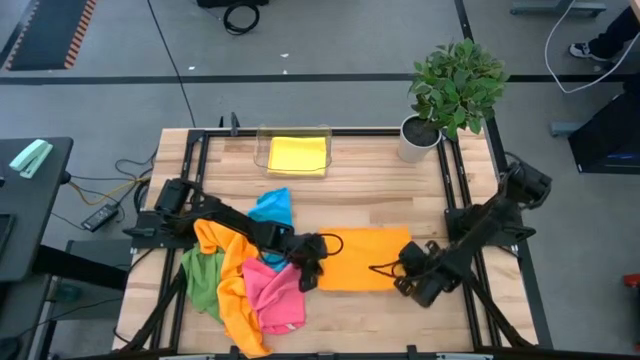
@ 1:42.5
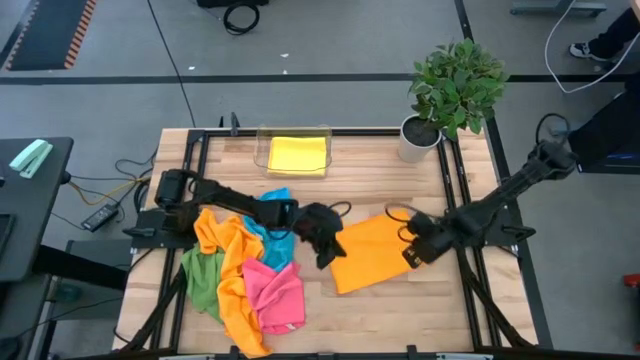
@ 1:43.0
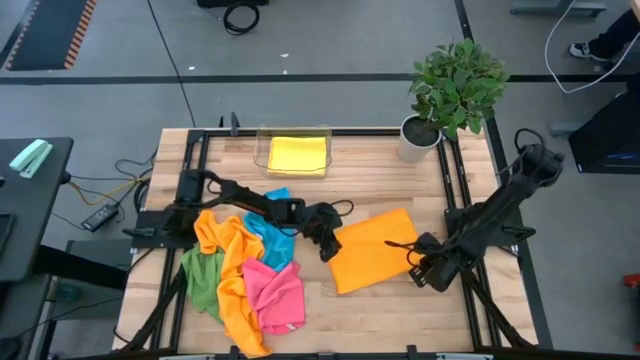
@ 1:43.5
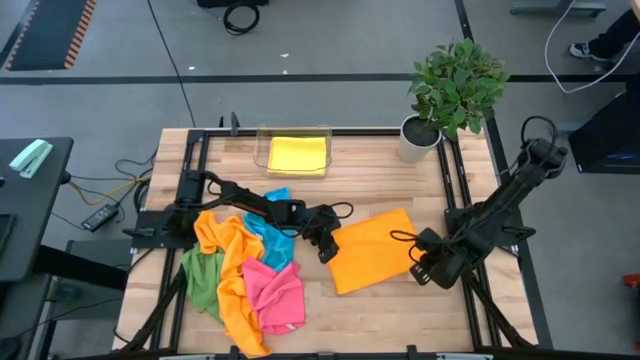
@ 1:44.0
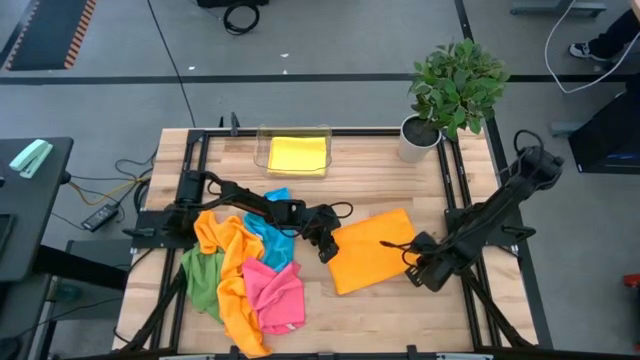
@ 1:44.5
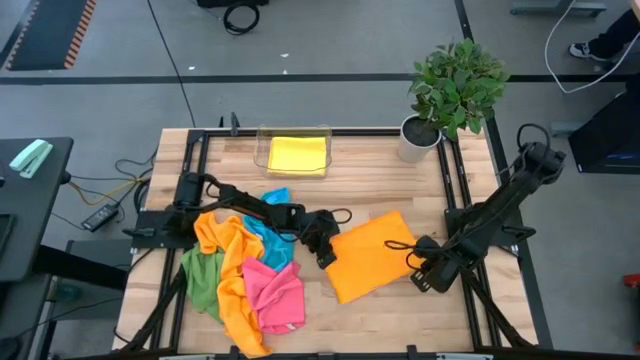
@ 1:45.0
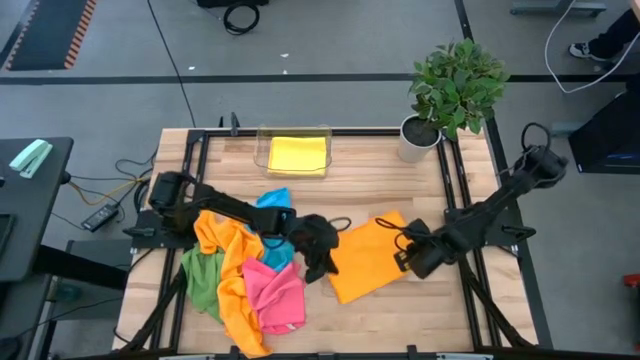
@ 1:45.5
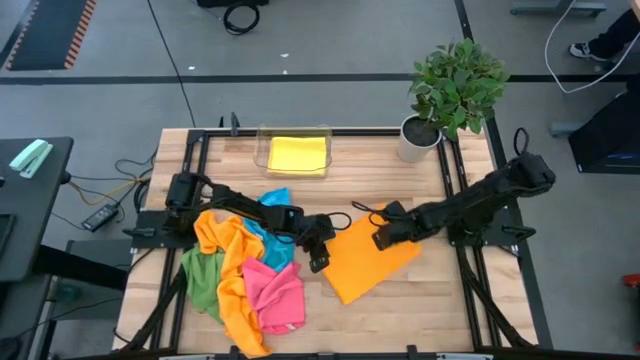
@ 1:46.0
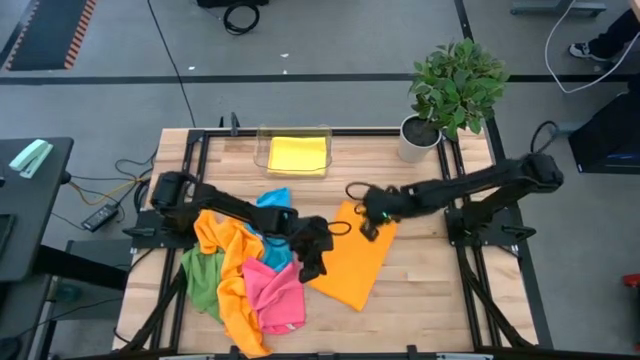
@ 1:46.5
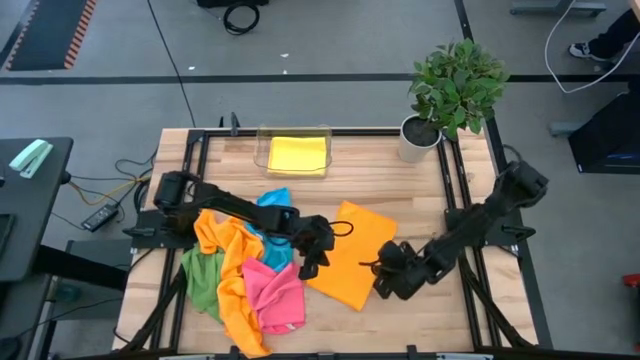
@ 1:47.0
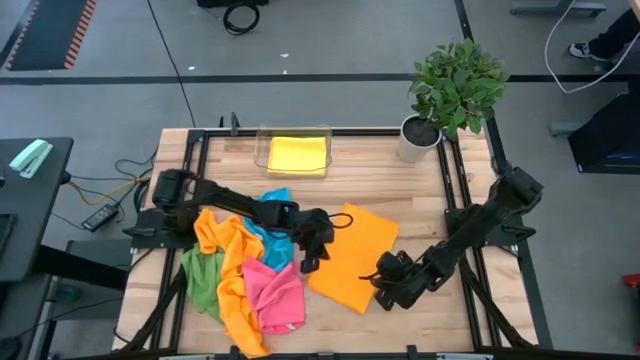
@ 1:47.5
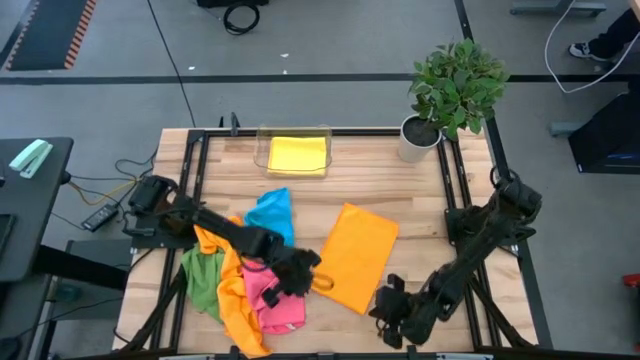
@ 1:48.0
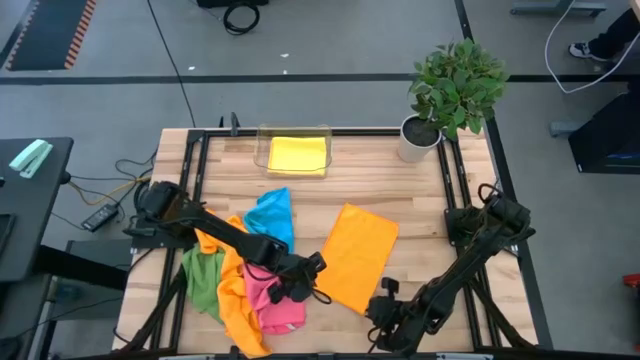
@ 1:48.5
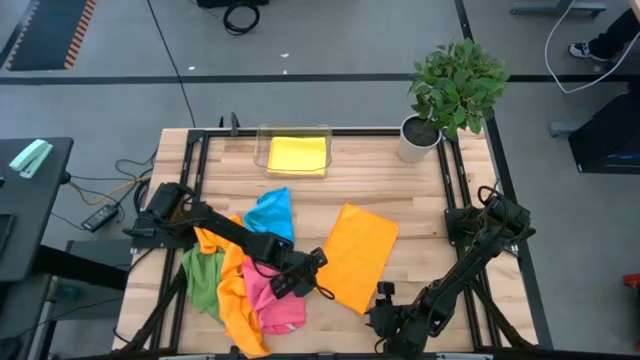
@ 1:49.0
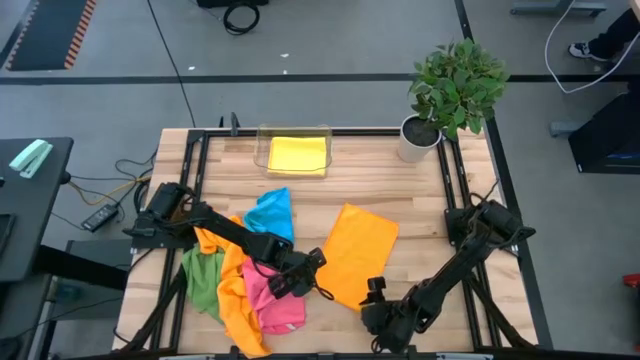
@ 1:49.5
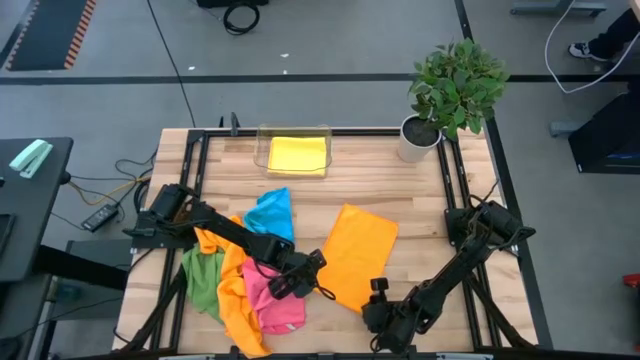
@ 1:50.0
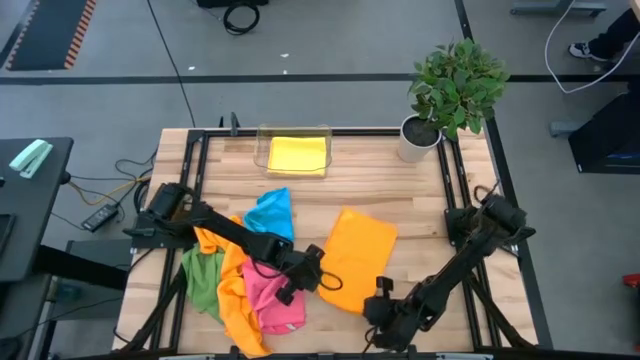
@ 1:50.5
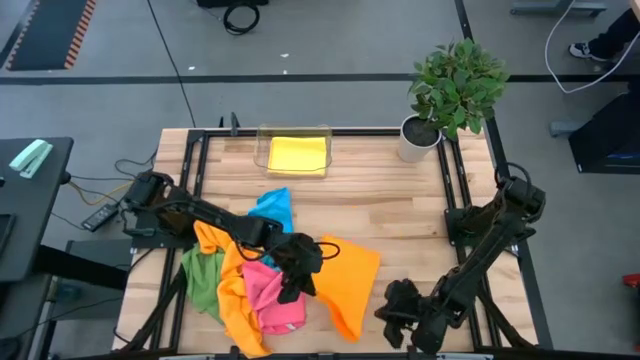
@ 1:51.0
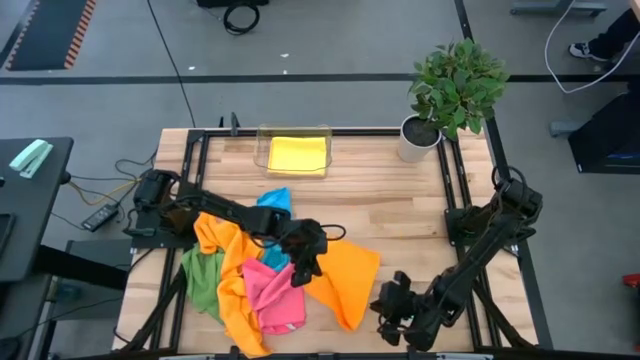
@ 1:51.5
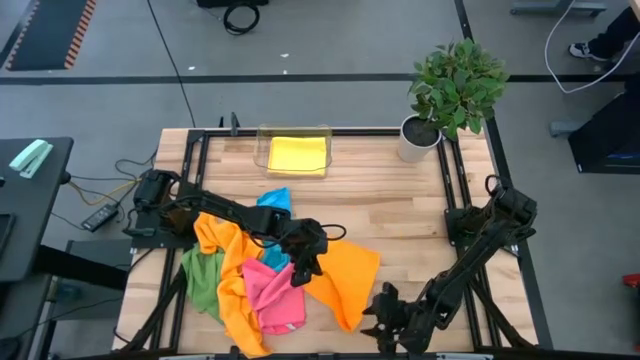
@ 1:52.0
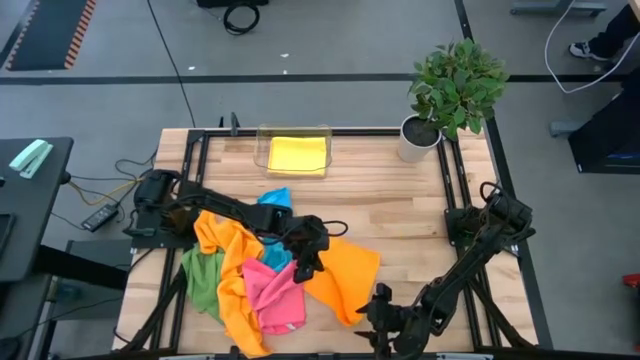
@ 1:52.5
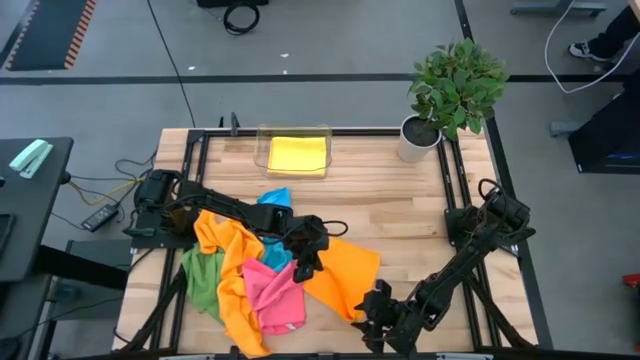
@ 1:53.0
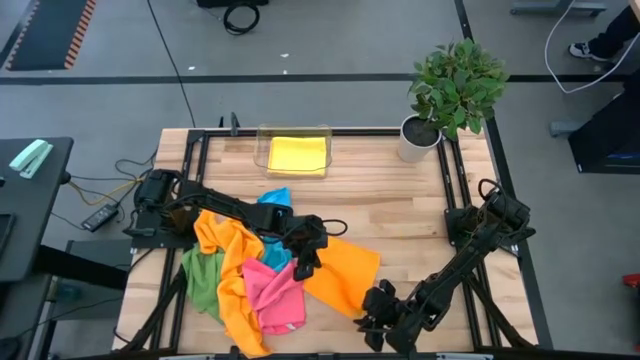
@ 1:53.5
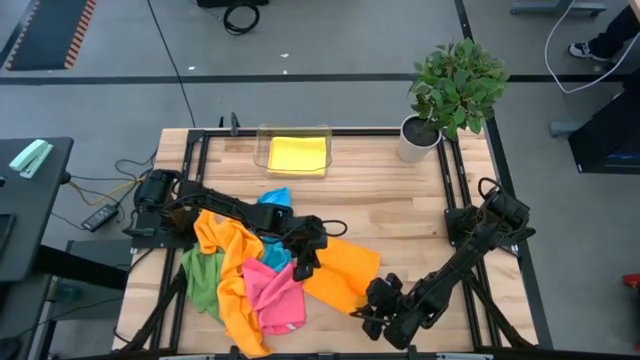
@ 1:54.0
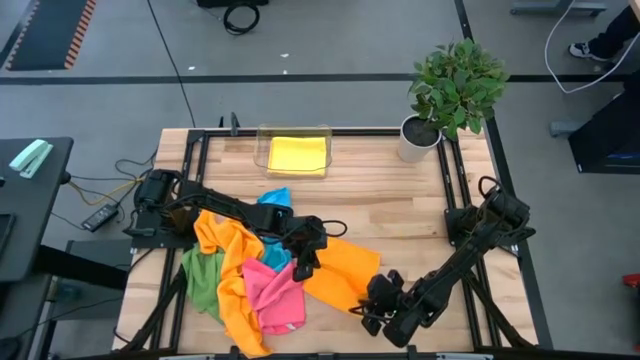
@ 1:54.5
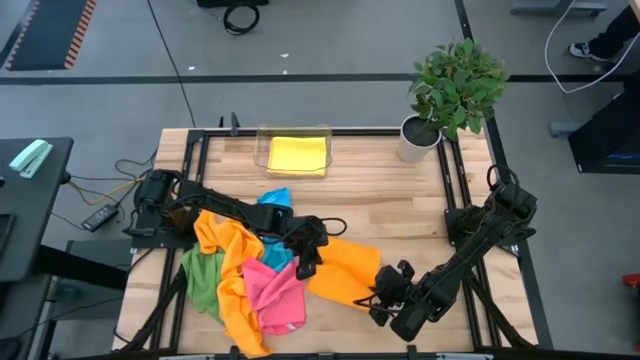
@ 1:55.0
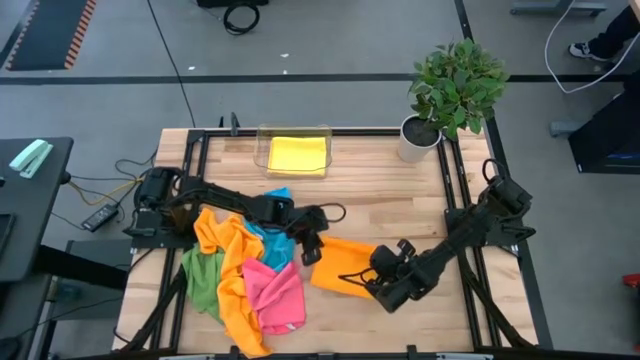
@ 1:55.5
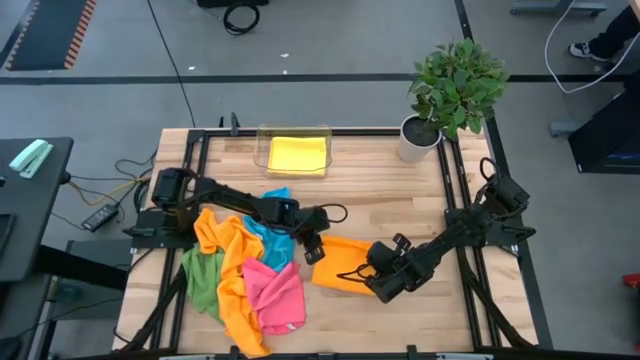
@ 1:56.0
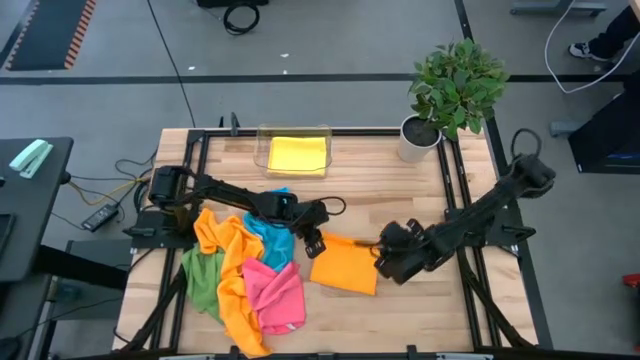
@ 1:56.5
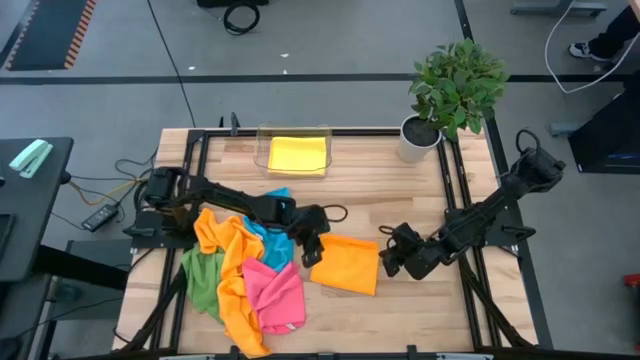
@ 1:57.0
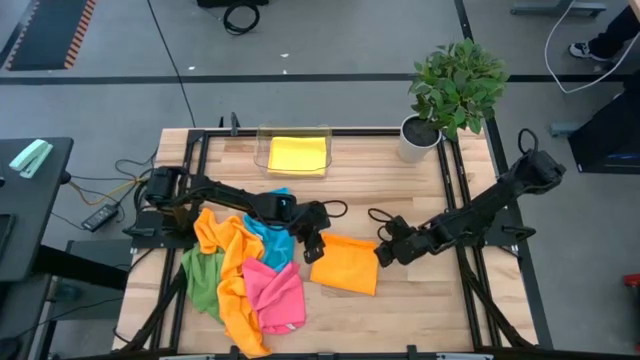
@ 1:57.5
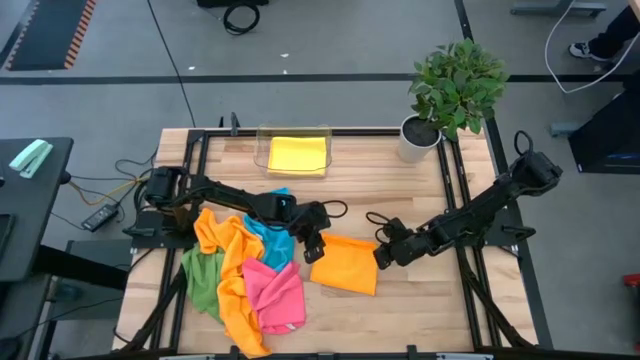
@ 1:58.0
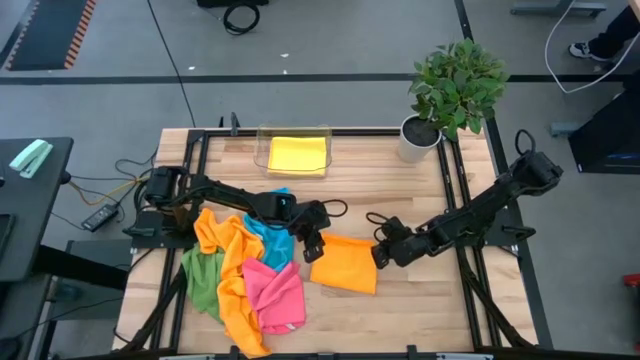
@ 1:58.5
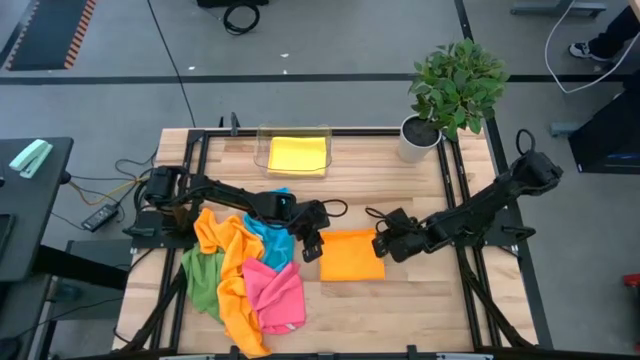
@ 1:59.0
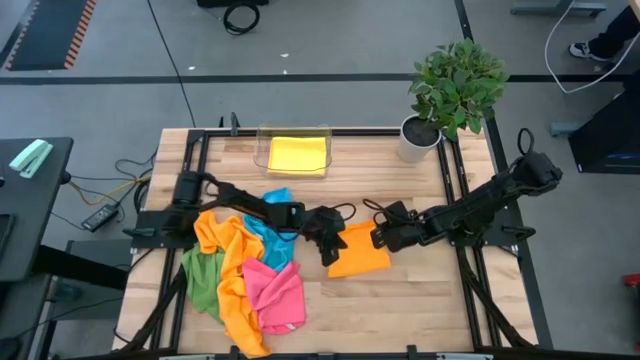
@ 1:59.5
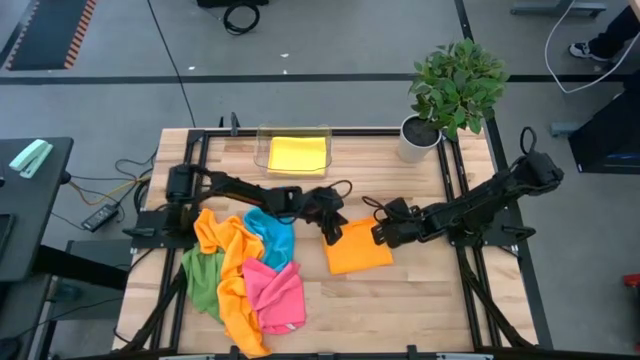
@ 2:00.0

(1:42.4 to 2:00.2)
Task: Fold microfiber towels
Fold the orange microfiber towel

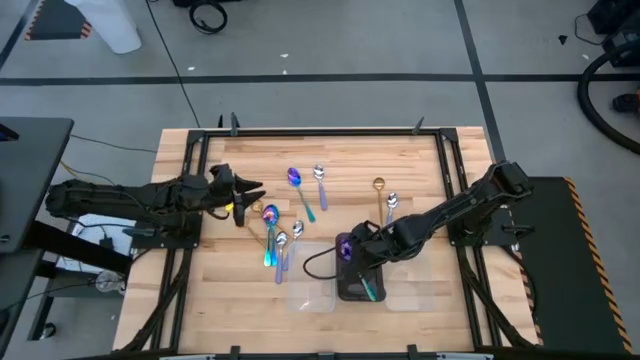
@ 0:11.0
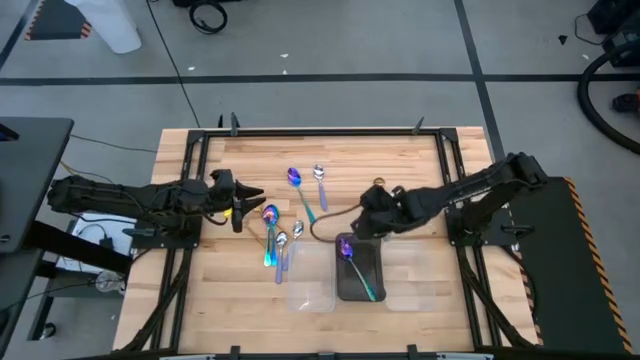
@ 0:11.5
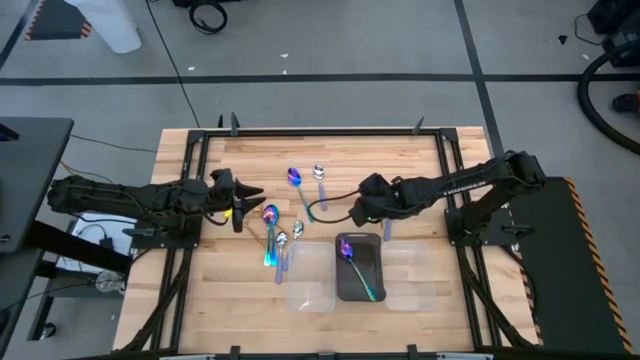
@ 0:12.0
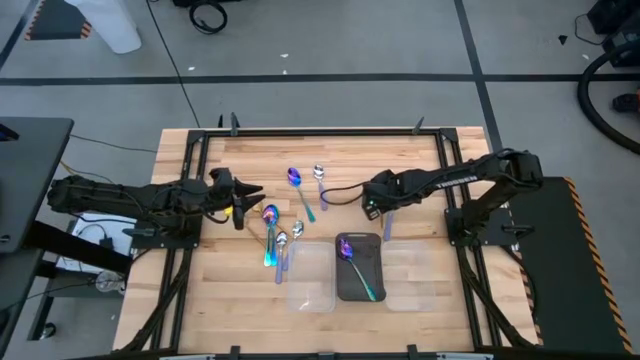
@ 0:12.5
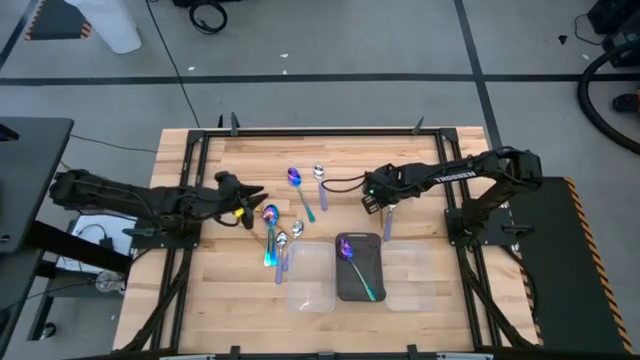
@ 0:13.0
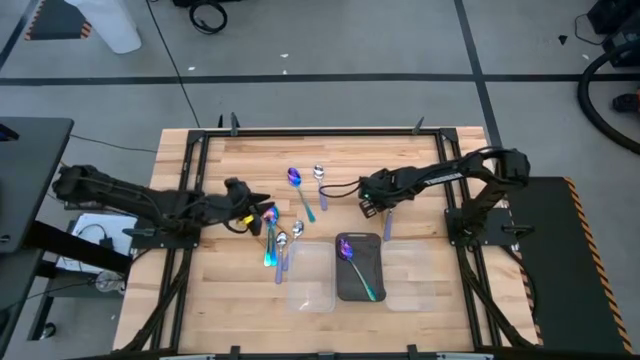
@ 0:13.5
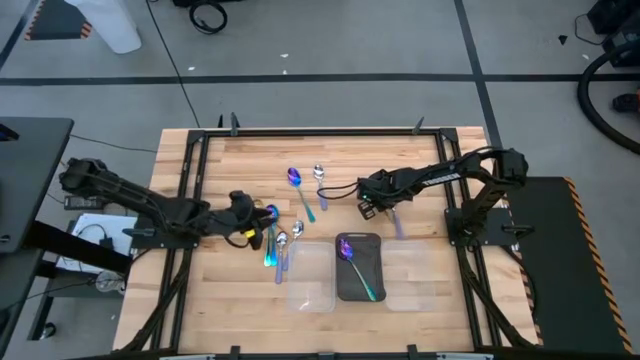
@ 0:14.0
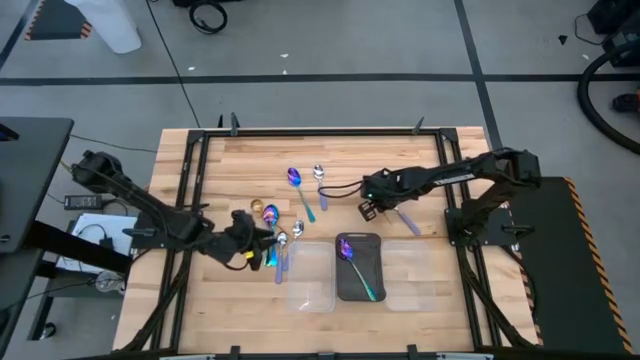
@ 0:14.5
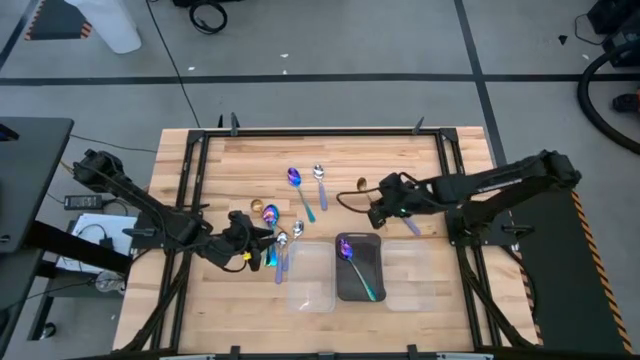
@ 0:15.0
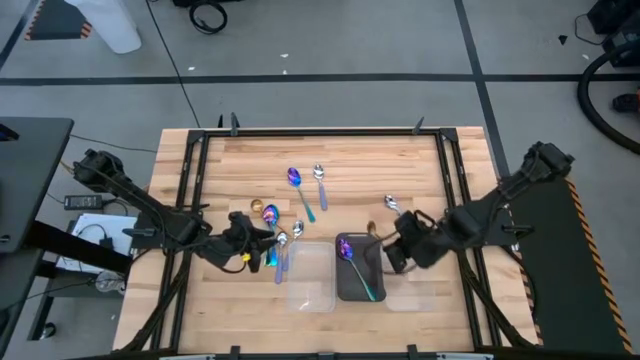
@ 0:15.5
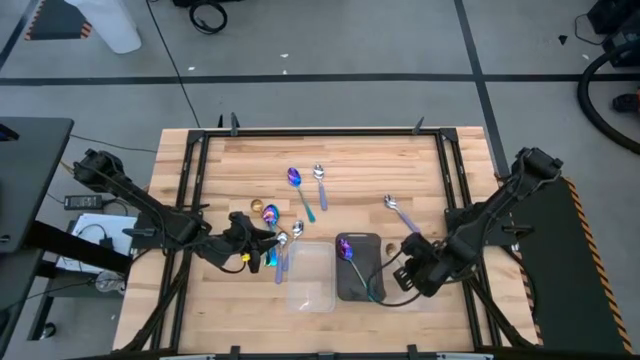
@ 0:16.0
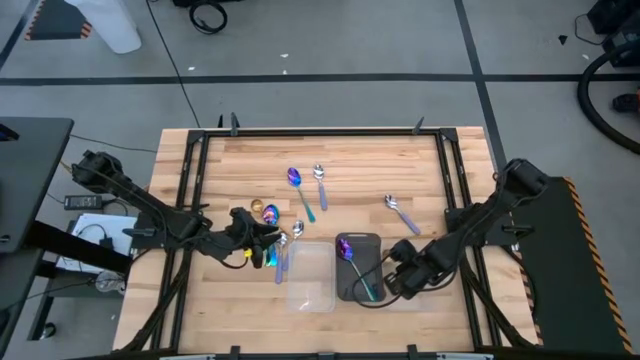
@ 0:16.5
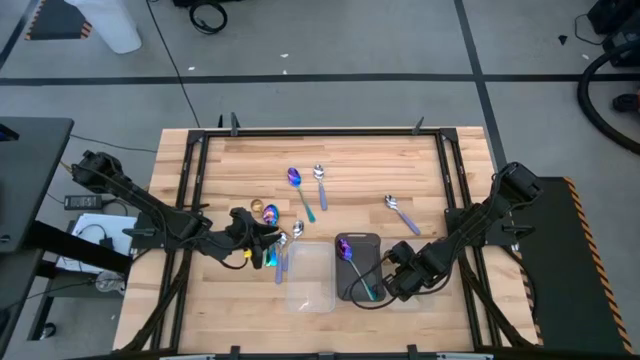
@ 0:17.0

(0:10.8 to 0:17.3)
Task: Sort silverware by color (type)
Put the gold spoon into the right transparent bin
